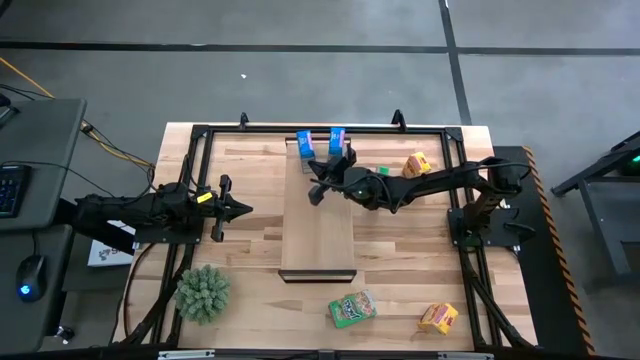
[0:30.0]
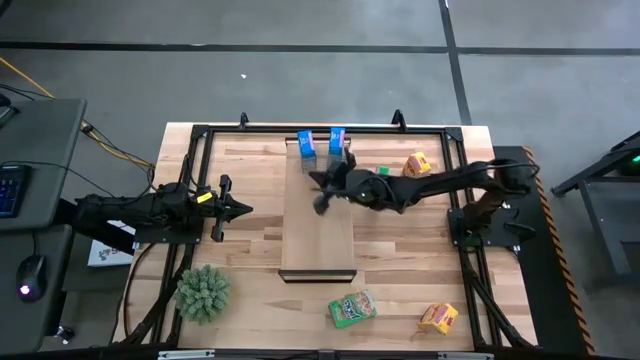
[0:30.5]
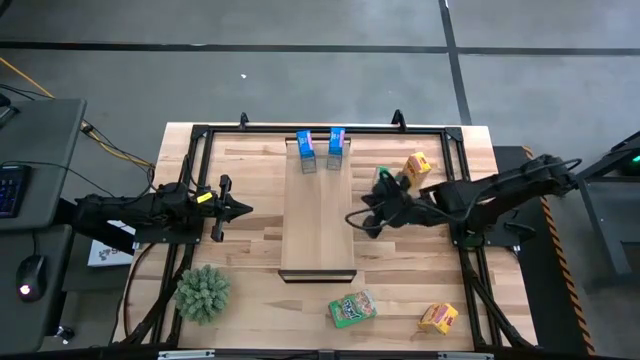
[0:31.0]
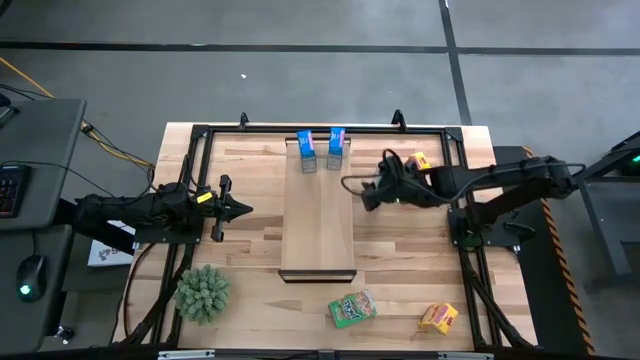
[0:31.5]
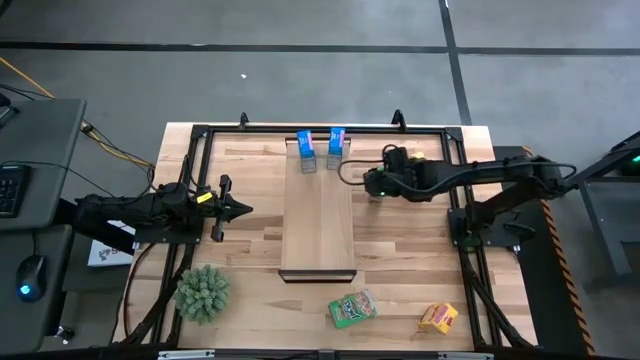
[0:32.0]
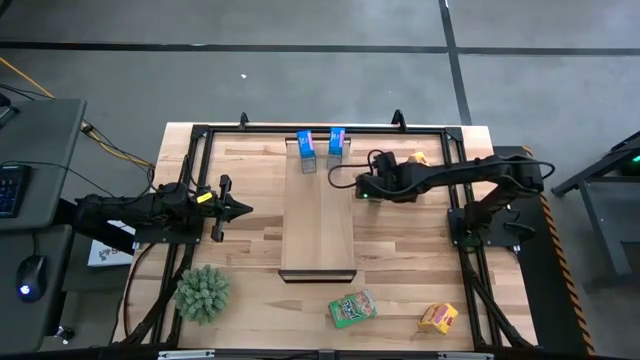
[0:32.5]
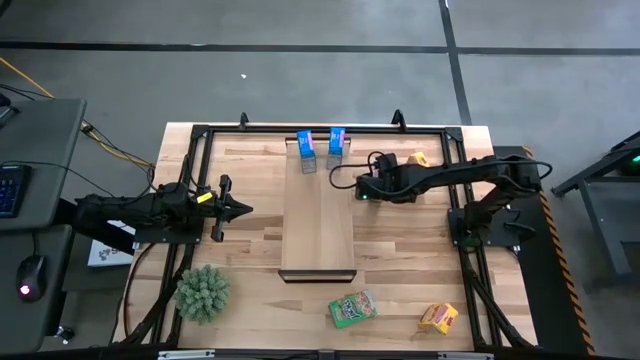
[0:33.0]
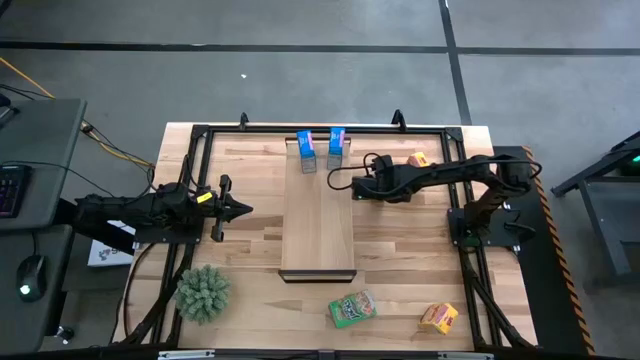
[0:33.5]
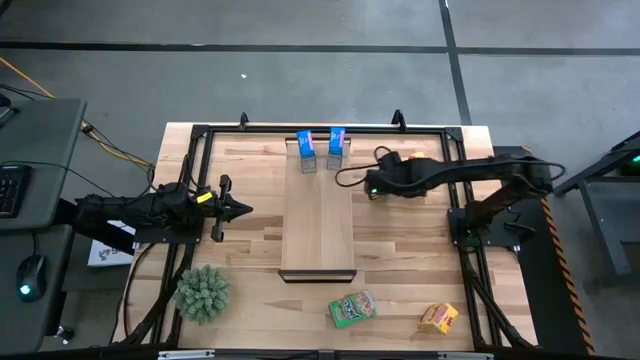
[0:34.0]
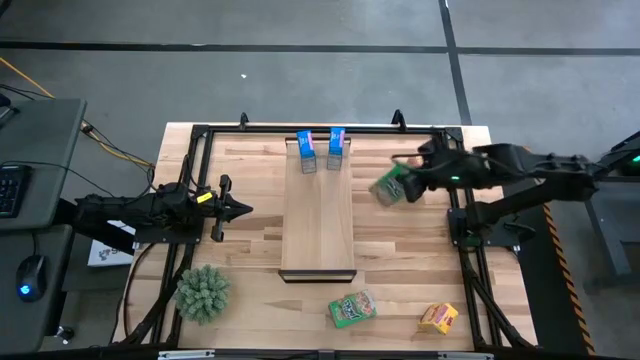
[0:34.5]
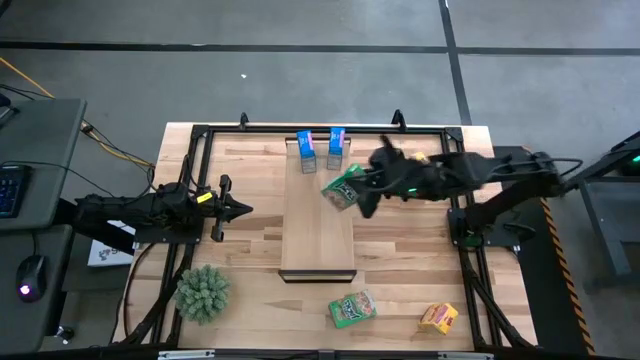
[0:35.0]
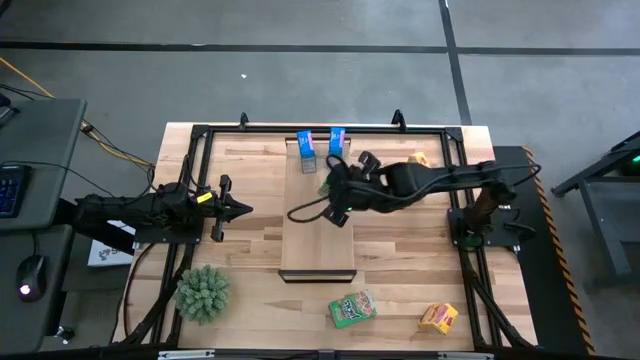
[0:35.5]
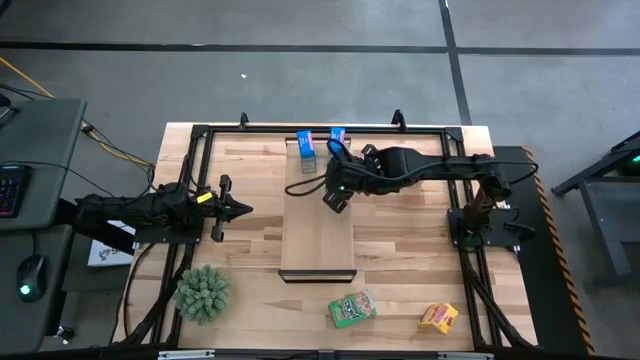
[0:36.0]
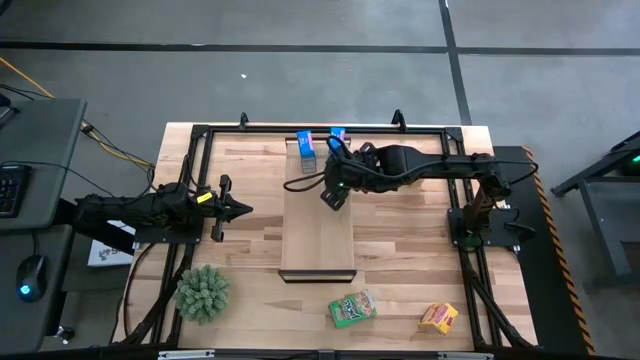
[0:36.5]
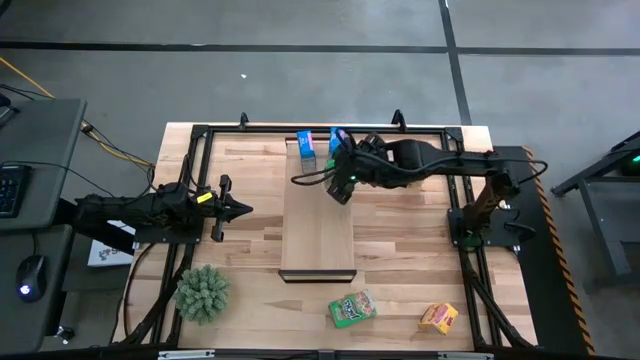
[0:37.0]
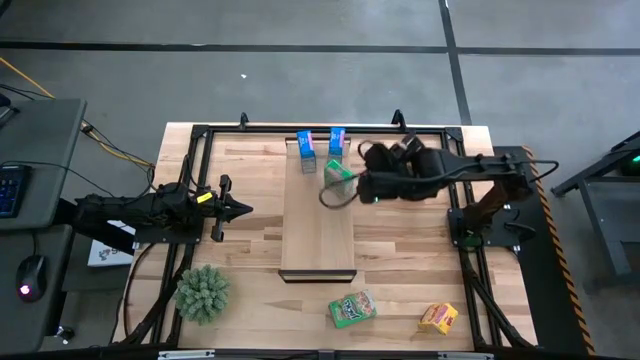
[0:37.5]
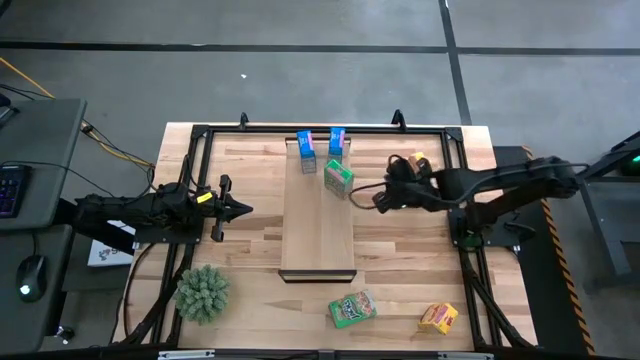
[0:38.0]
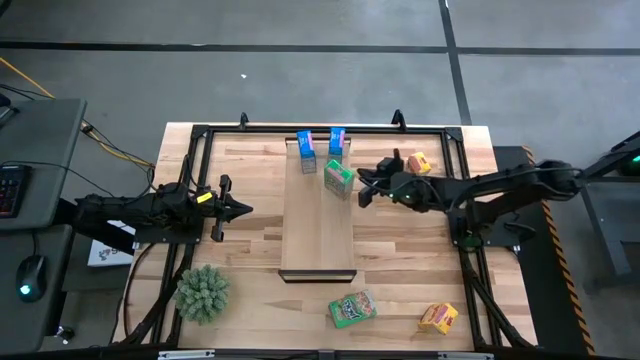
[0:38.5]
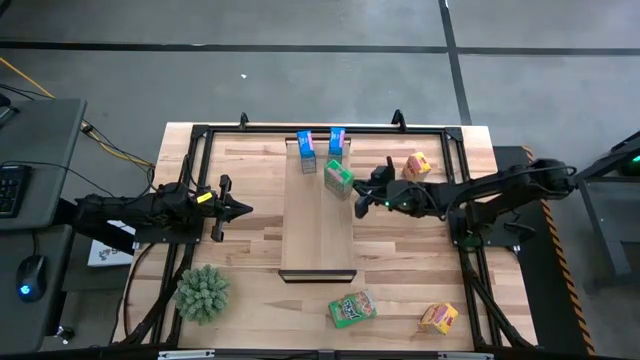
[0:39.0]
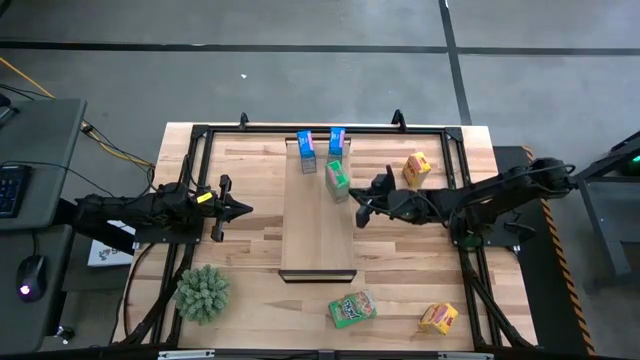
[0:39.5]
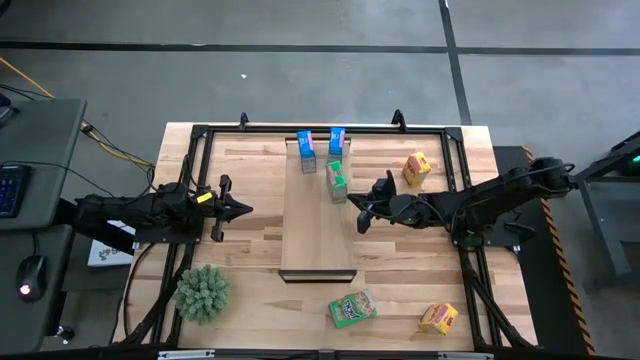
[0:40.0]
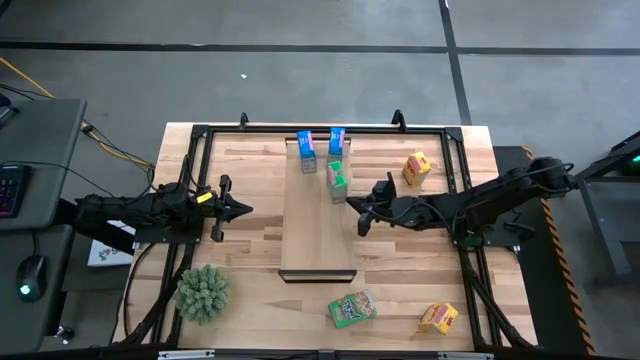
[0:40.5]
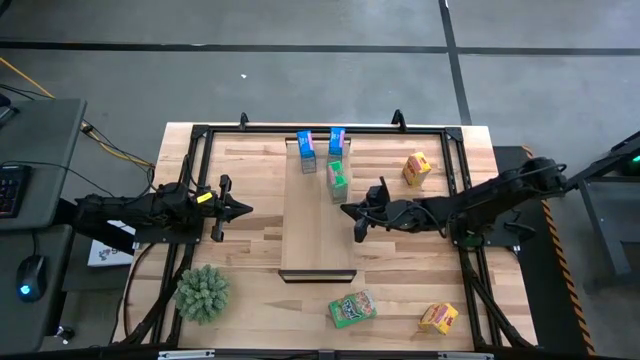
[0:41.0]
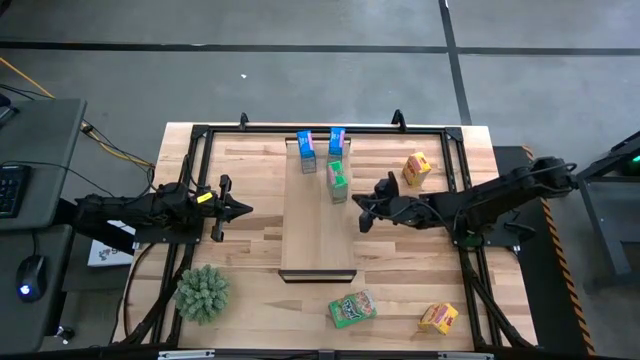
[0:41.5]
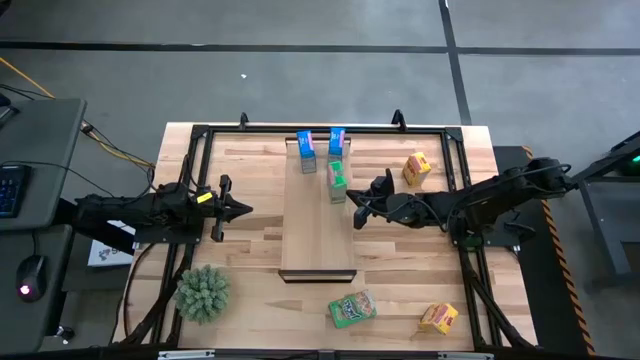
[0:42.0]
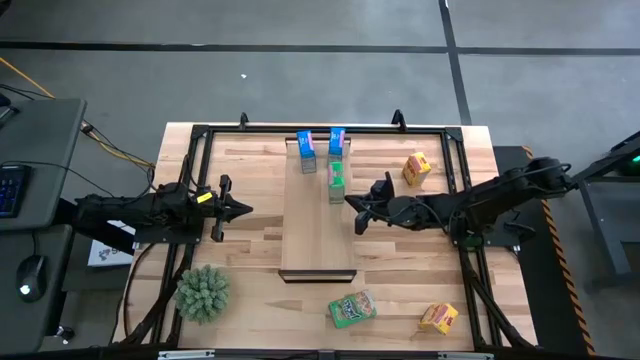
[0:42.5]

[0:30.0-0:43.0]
Task: Stack cereal on shelf
Put the top green cereal box on the shelf

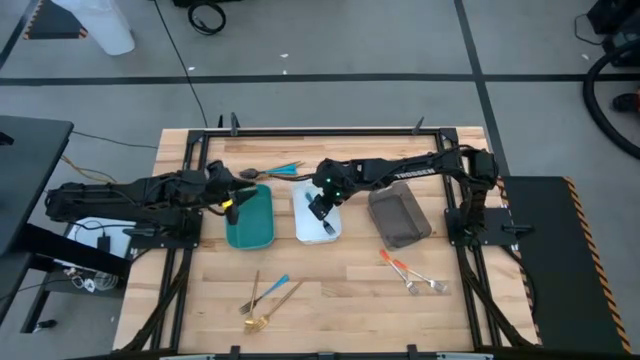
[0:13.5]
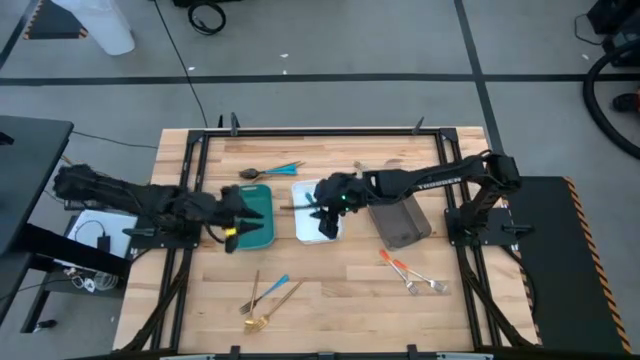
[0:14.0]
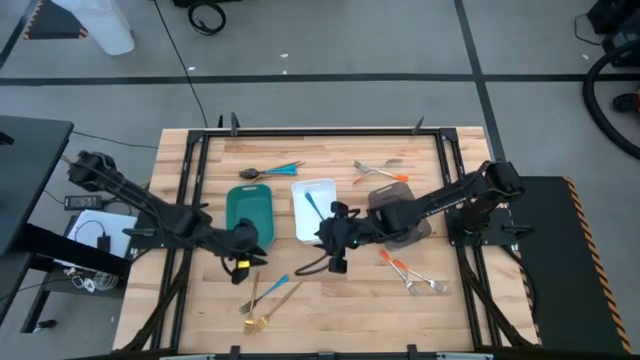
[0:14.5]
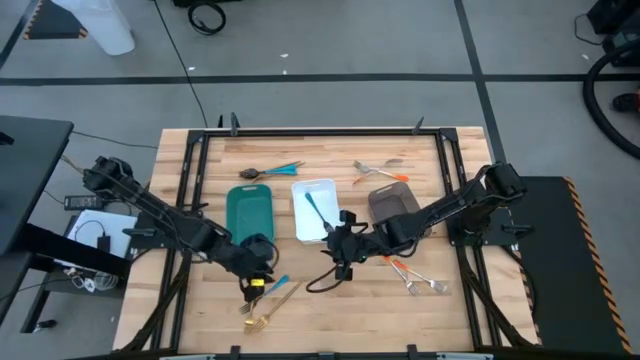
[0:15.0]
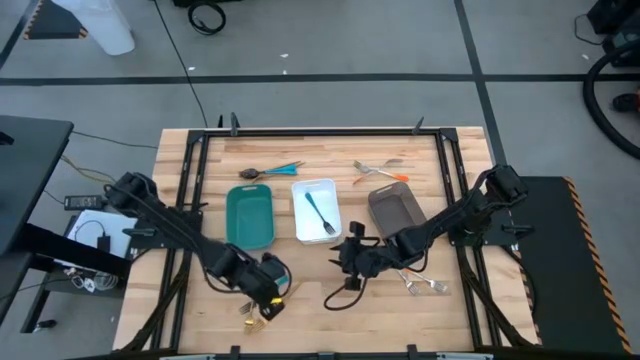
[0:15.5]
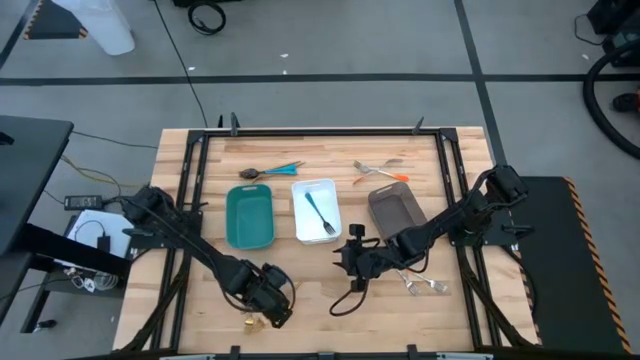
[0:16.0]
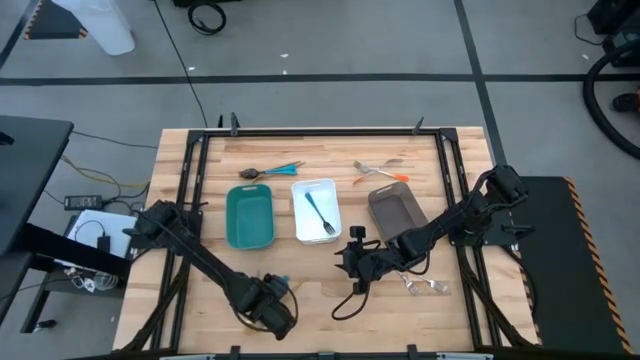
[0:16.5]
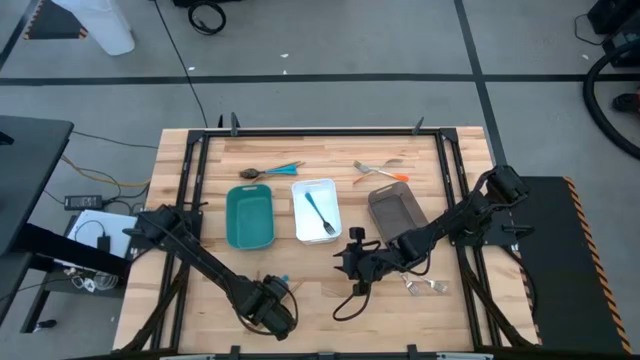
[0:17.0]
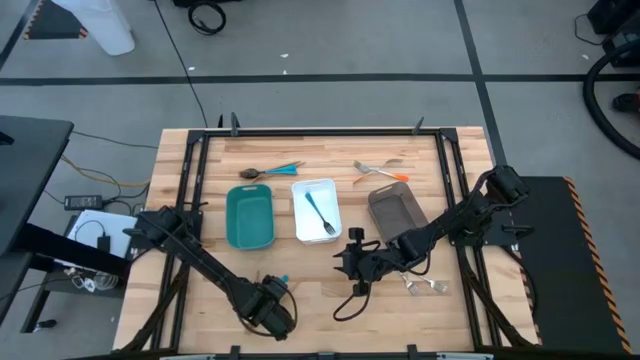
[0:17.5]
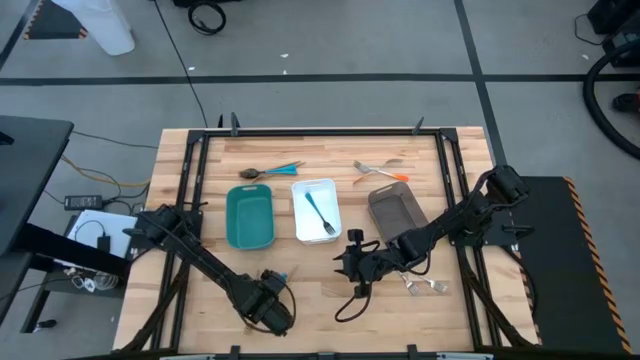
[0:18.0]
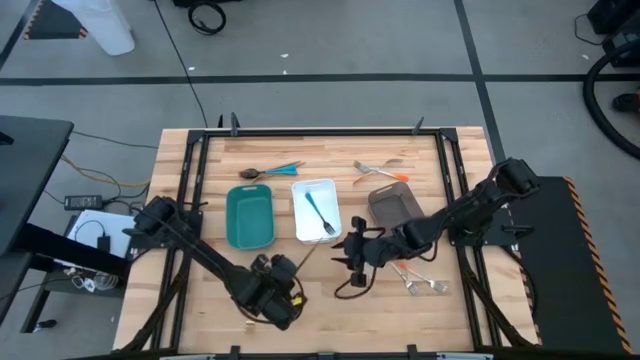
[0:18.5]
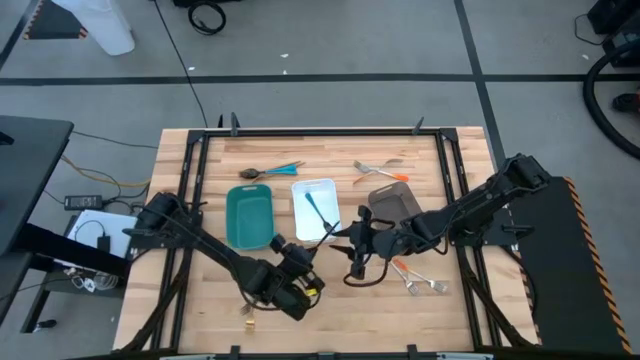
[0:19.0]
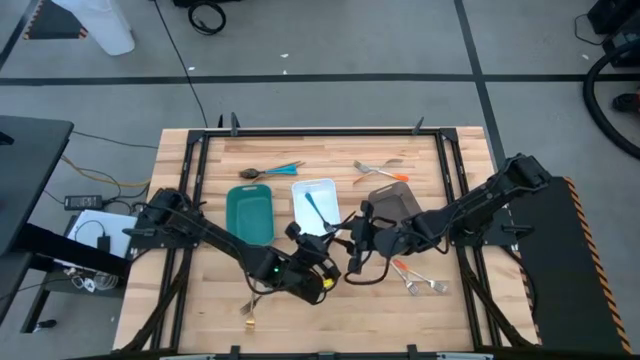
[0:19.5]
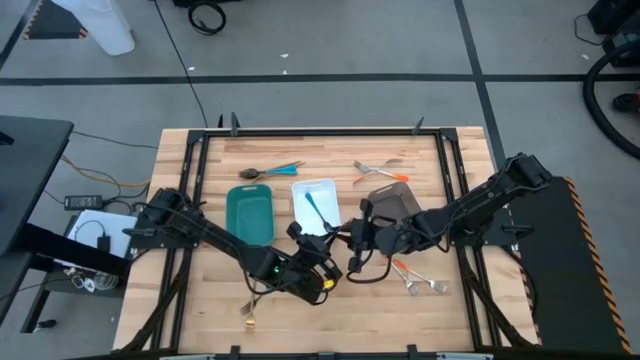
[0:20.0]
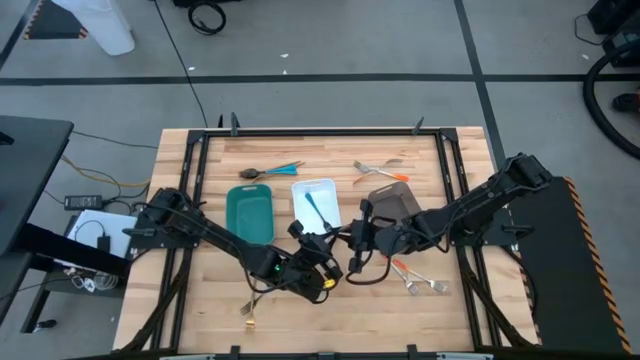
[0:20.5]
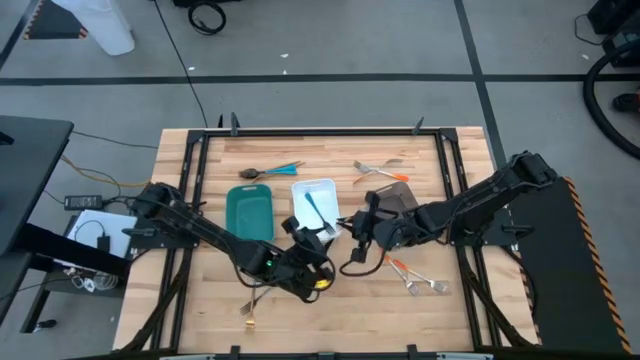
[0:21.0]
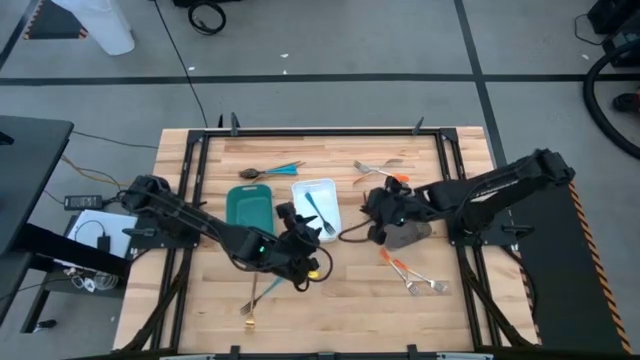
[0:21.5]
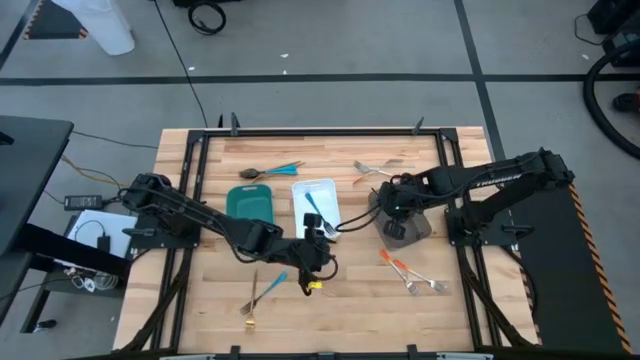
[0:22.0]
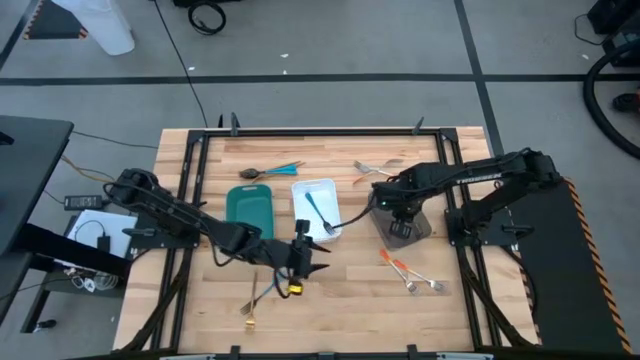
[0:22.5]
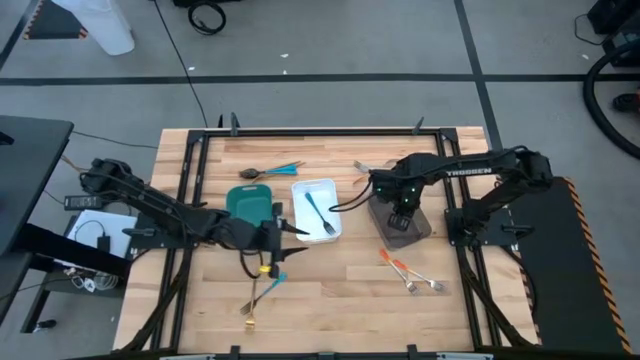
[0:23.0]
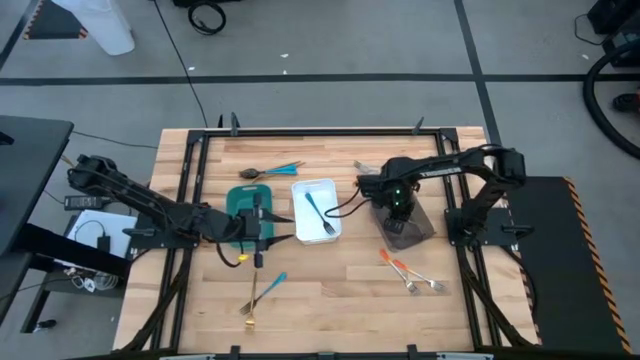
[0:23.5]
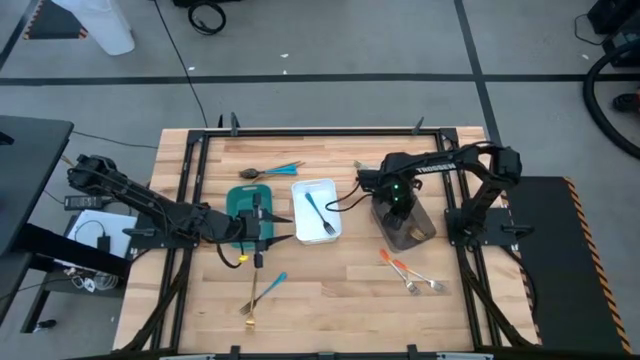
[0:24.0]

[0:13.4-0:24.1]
Task: Sort silverware by color (type)
Put the gold fork into the black bin
